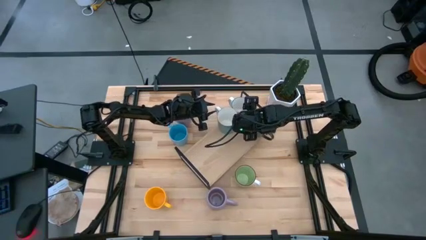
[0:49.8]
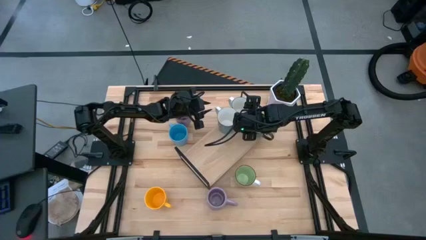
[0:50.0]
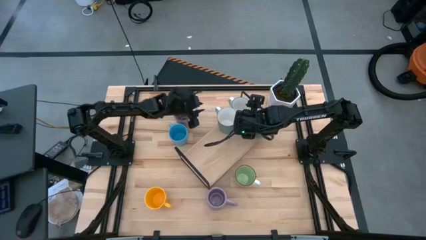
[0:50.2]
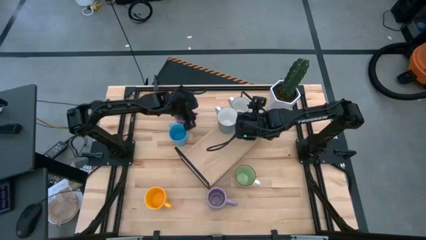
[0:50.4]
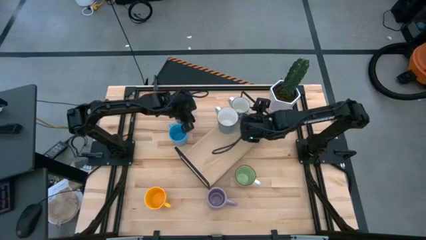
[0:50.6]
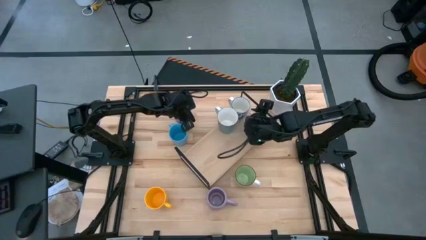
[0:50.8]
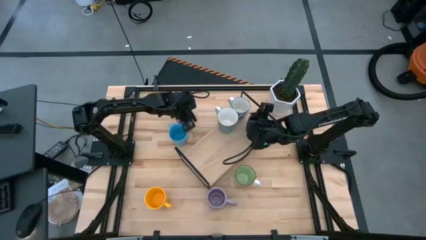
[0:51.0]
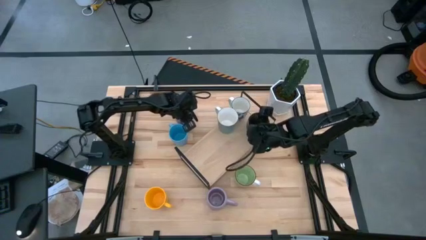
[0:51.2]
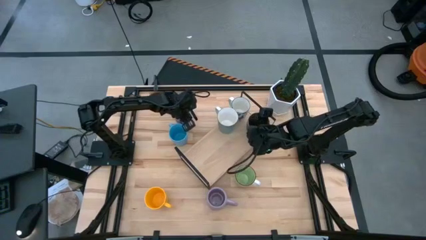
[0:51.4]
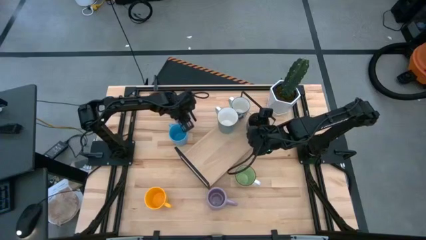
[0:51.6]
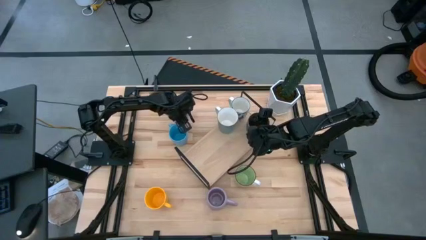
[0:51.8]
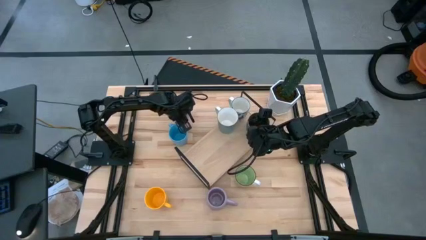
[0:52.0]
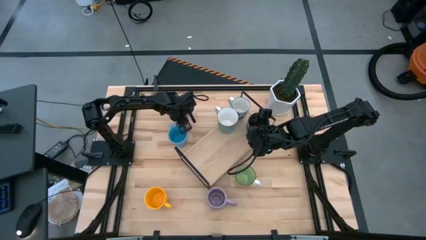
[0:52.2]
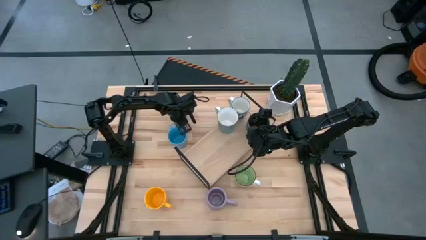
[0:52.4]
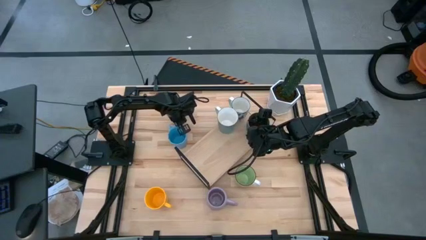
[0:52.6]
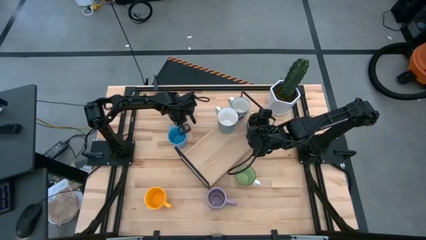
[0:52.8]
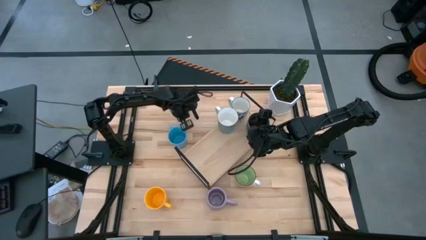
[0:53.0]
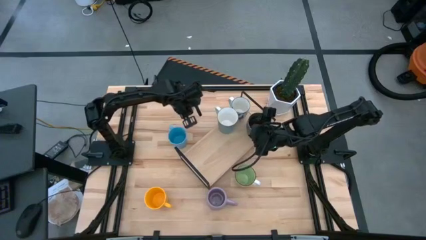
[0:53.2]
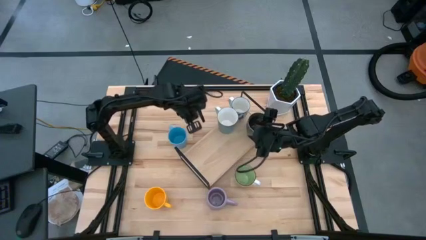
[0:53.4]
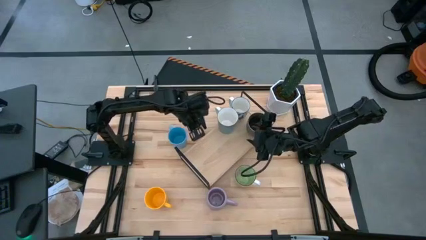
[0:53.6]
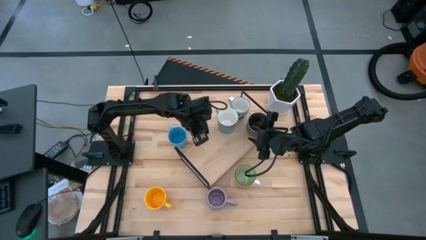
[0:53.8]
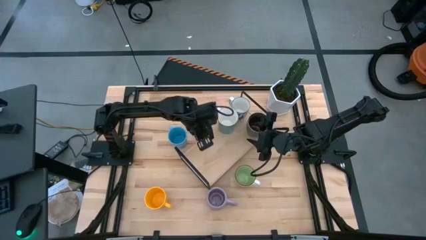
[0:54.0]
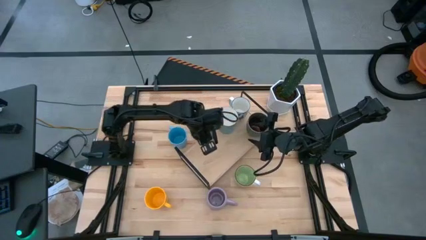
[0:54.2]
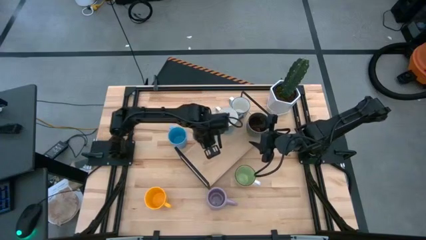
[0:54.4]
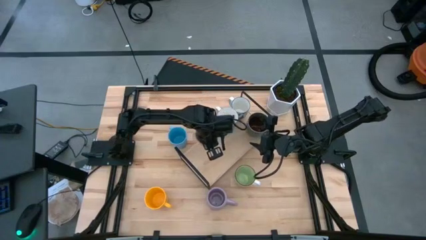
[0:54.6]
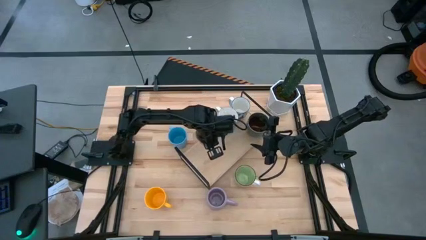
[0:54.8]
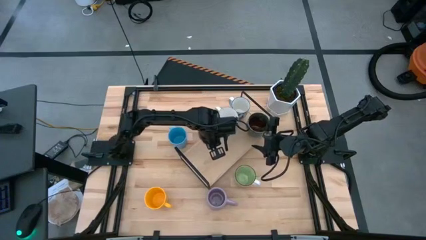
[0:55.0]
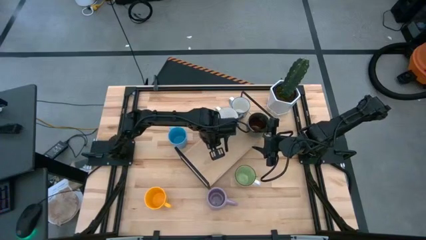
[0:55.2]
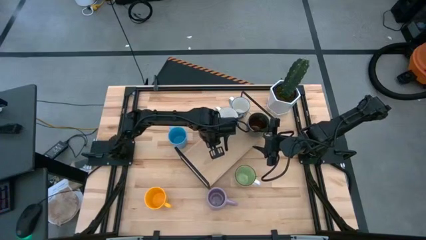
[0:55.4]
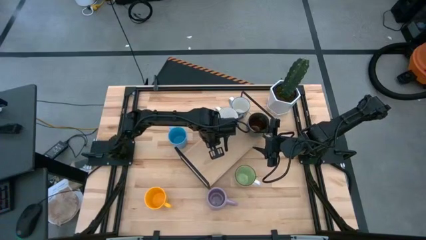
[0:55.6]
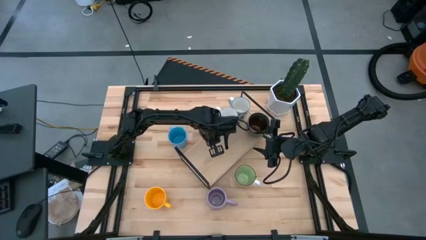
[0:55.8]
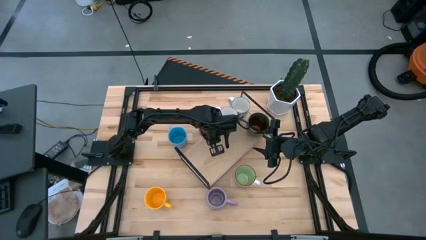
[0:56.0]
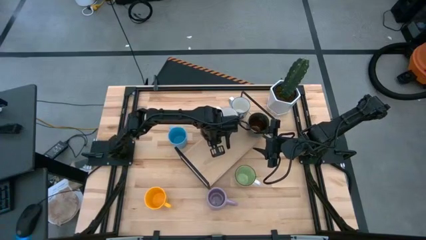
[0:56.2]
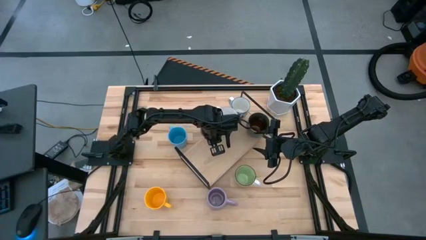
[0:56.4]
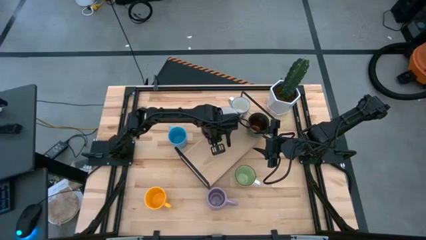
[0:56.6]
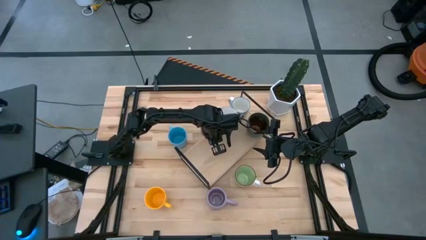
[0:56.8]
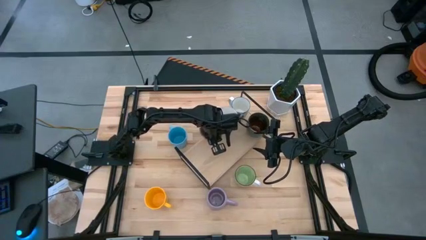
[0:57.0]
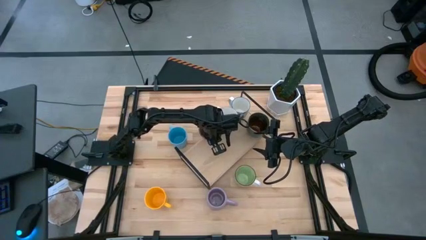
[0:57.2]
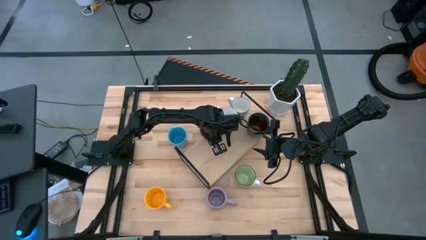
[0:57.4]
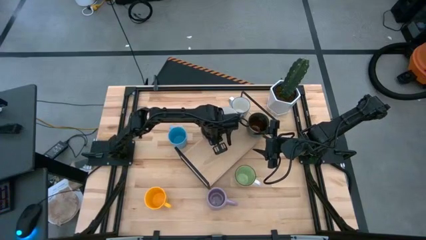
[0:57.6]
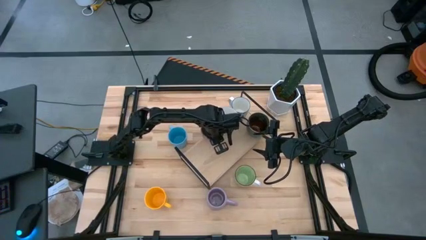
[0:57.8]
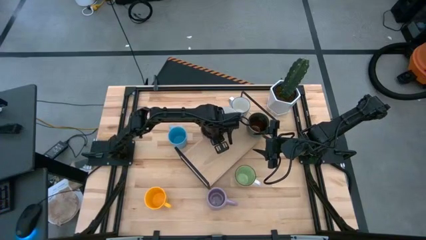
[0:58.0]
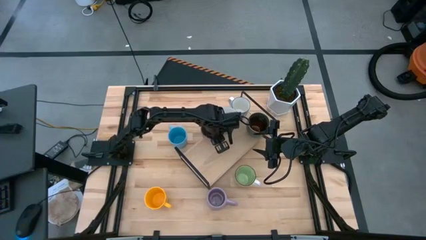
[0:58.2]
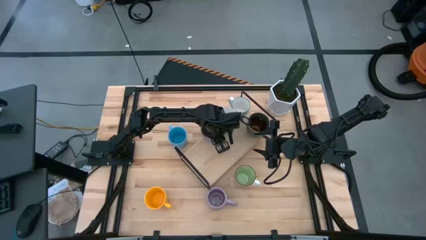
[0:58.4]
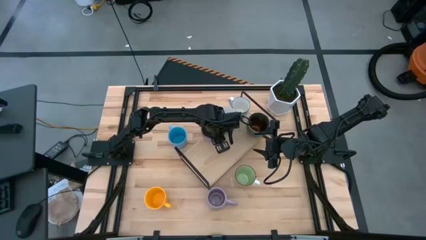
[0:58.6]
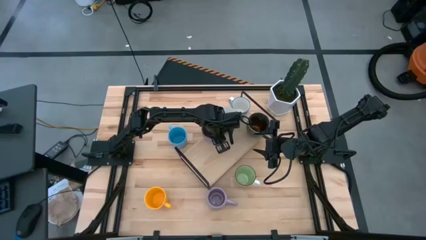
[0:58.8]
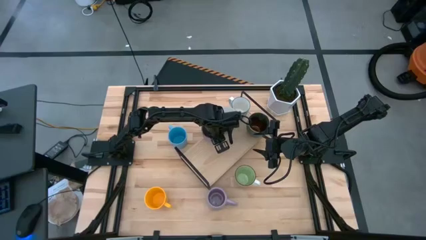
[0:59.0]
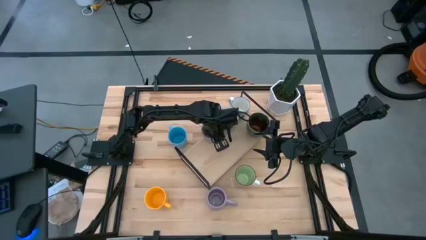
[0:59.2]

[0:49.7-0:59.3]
Task: Place coffee mugs
Put the top purple mug on the shelf

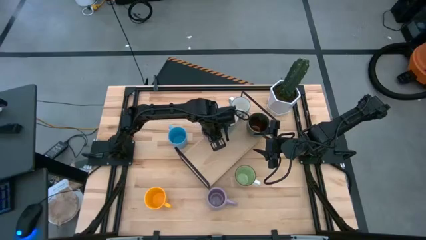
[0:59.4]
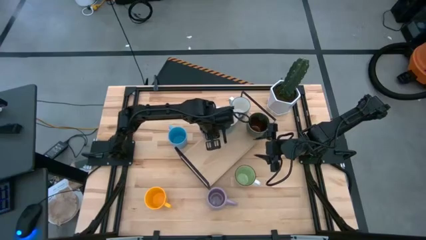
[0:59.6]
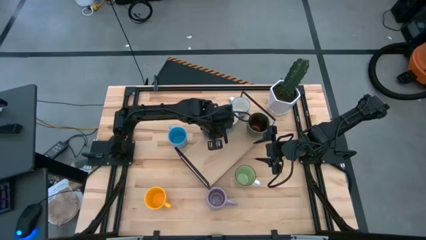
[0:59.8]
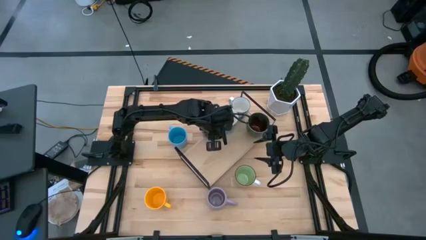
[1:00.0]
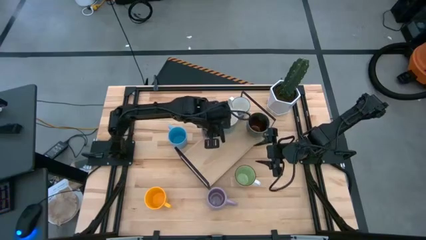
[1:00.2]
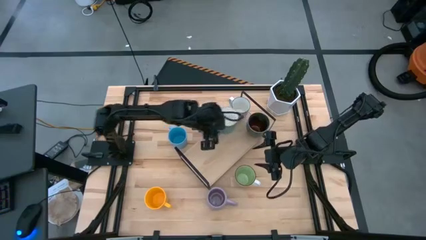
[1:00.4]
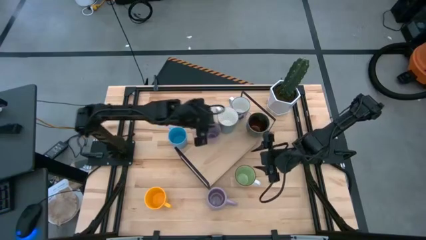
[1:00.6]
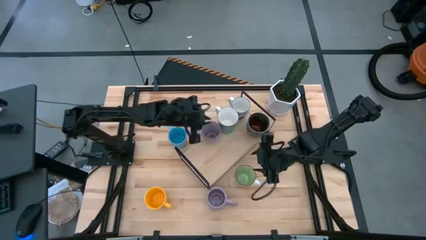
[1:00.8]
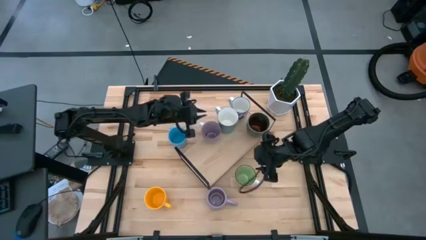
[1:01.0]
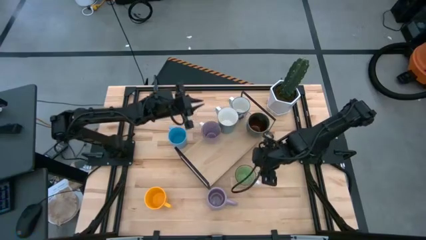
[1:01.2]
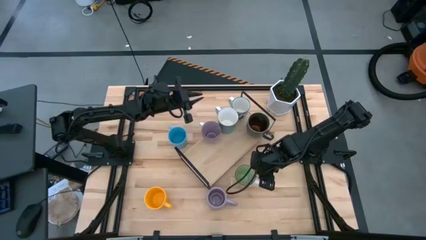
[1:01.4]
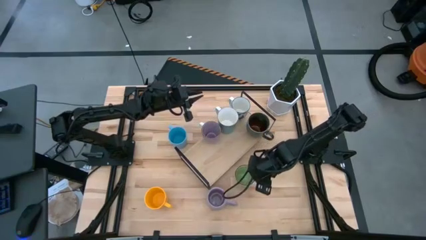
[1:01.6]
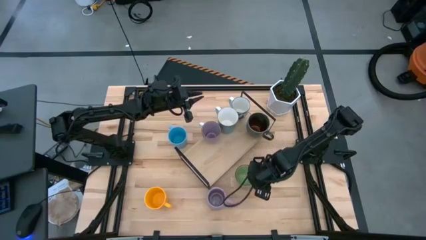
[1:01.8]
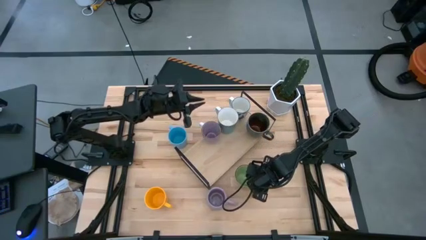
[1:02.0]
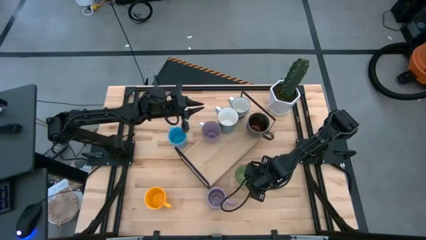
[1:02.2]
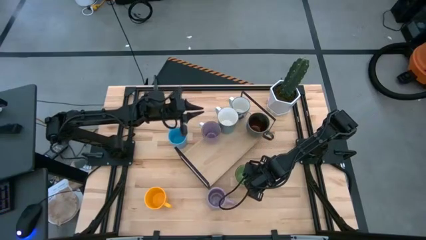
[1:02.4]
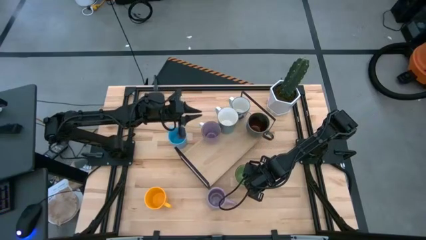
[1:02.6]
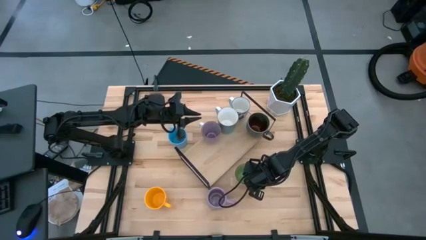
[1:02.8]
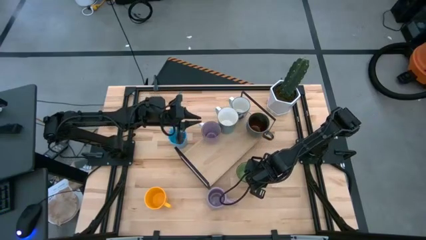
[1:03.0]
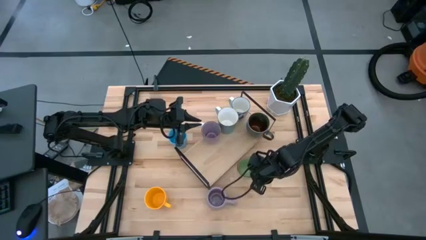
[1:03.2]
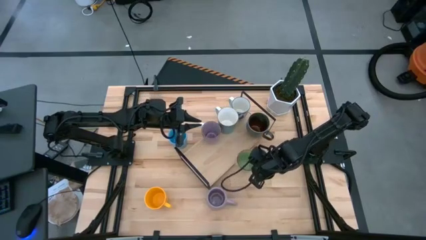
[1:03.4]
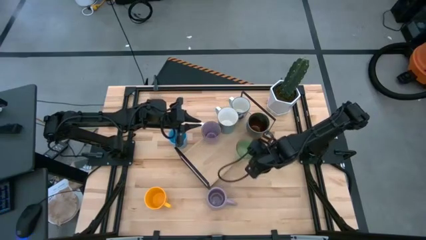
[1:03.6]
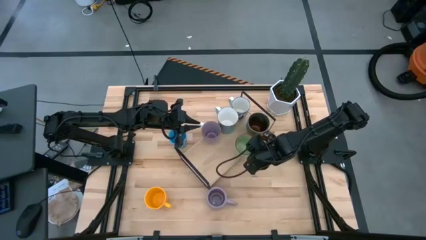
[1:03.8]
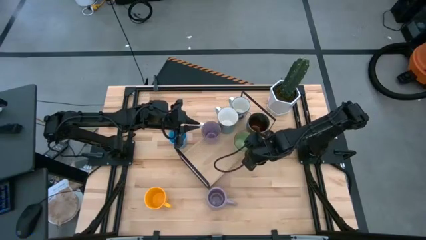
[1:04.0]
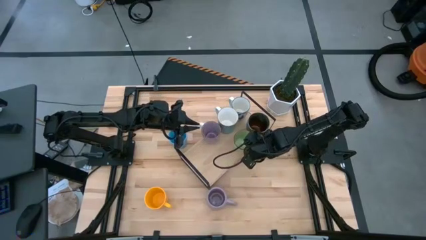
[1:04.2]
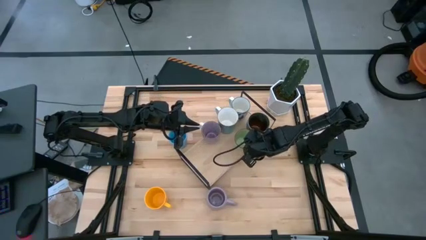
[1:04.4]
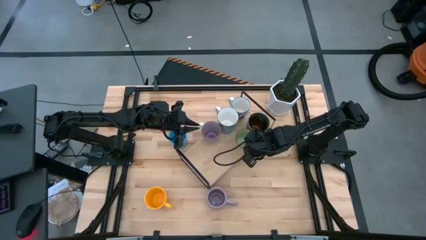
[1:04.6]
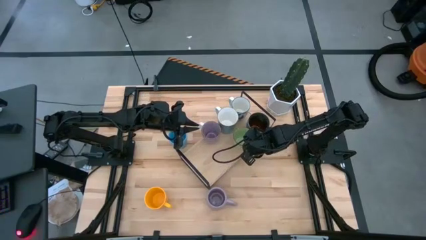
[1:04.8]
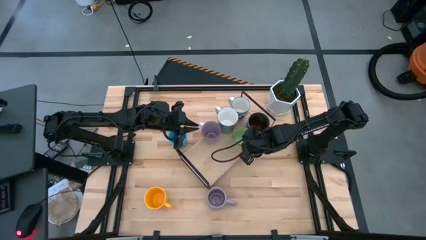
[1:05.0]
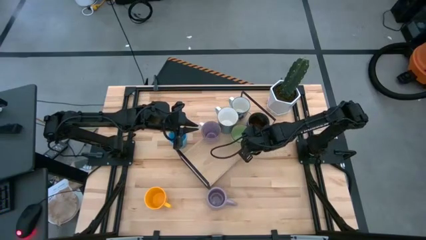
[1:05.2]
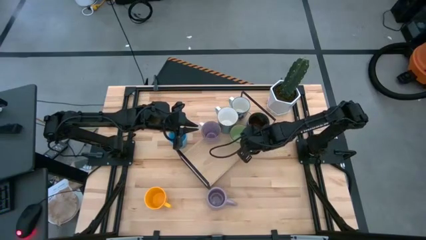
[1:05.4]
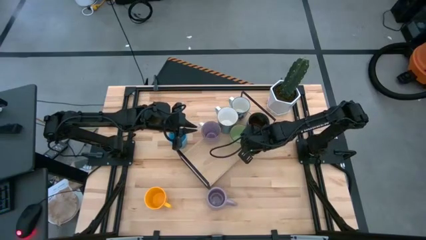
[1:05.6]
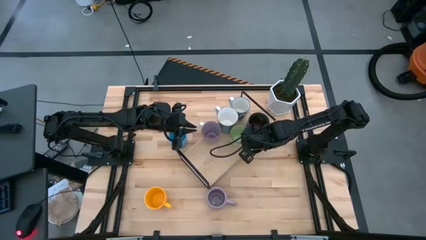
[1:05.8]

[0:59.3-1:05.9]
Put the green mug on the shelf

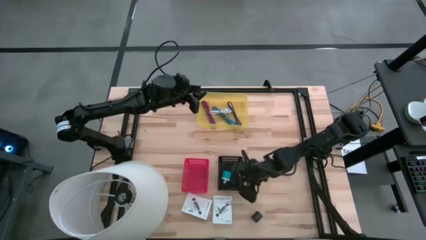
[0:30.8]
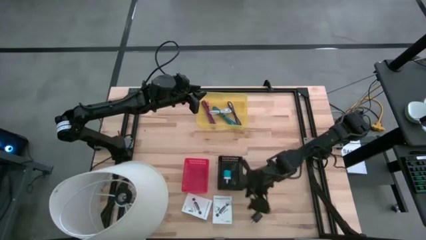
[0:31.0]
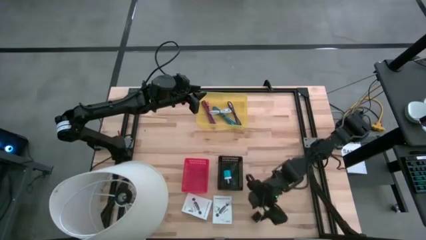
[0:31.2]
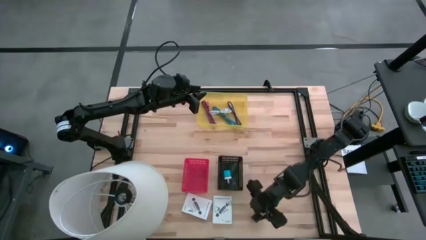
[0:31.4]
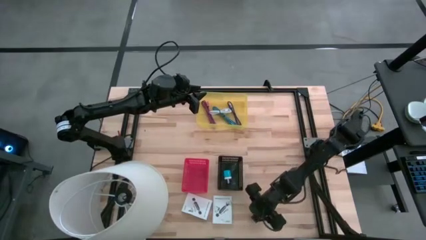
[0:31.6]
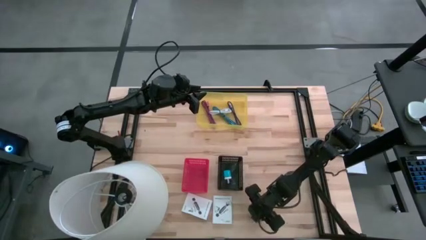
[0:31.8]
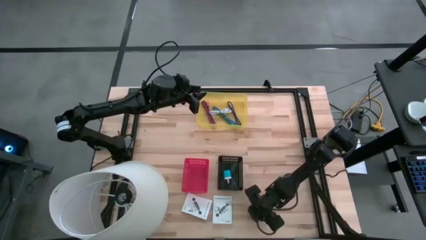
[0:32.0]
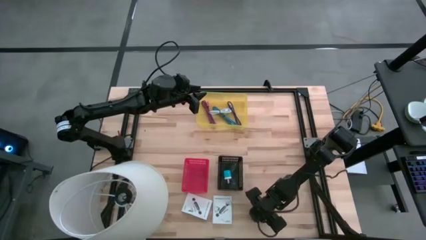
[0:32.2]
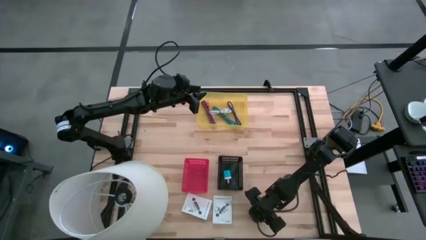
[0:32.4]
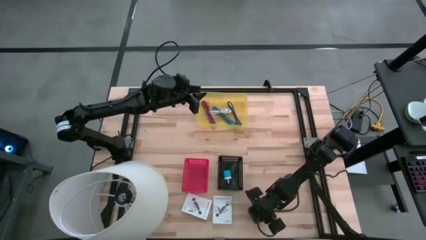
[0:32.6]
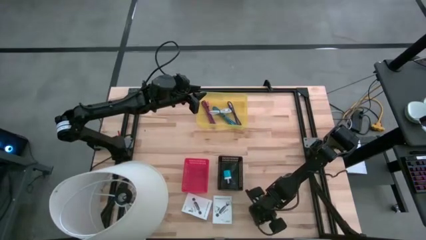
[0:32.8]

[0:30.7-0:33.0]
Task: Pick and place items into bin
Put the black charger adapter into the black bin
